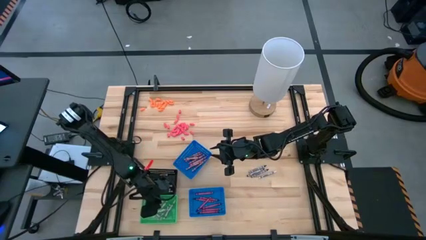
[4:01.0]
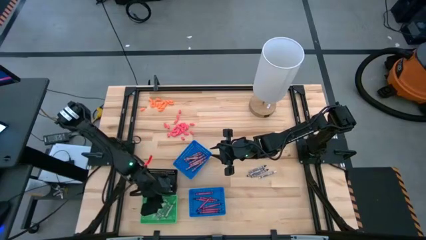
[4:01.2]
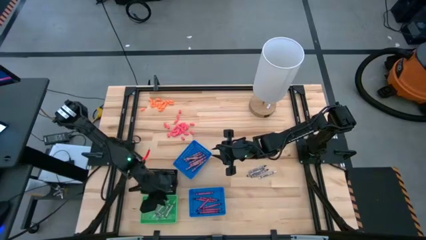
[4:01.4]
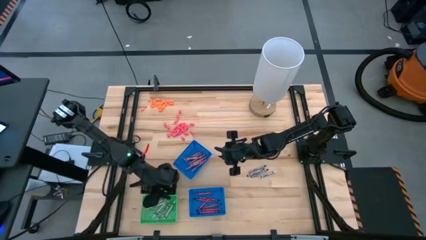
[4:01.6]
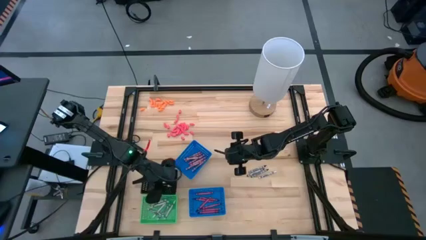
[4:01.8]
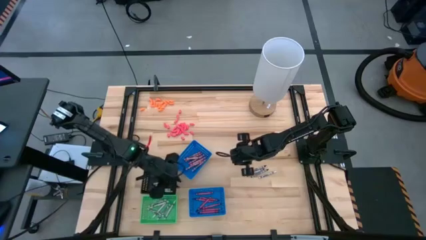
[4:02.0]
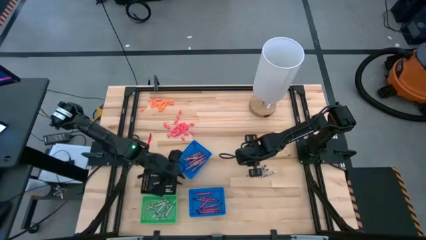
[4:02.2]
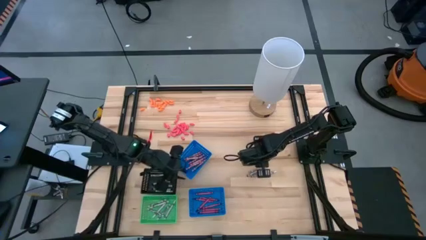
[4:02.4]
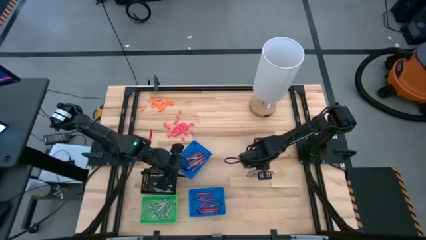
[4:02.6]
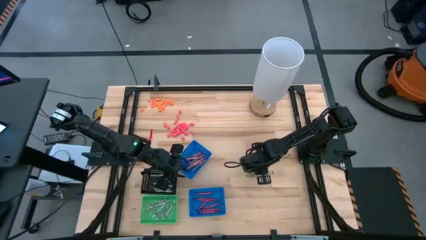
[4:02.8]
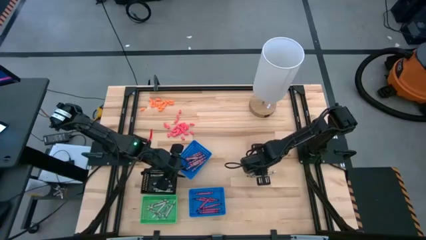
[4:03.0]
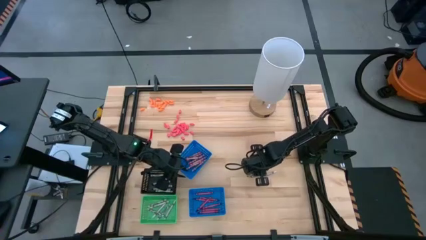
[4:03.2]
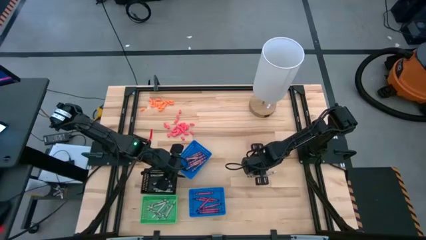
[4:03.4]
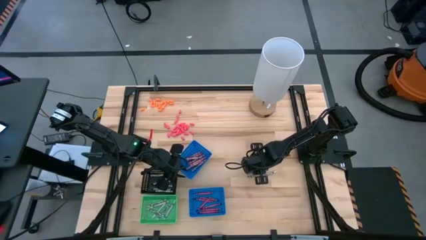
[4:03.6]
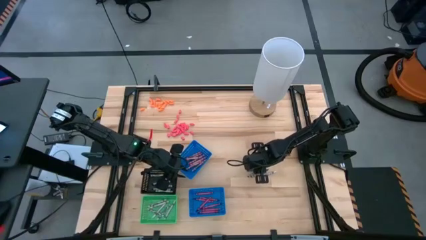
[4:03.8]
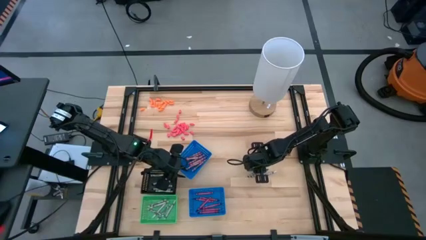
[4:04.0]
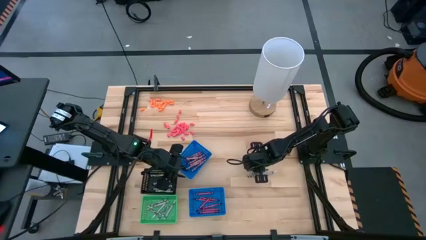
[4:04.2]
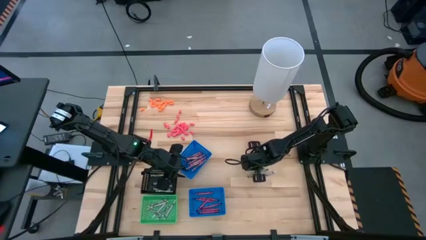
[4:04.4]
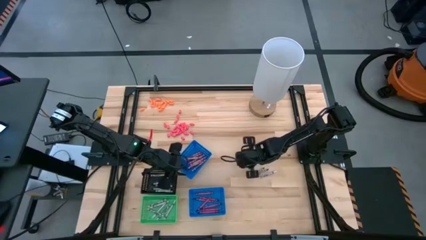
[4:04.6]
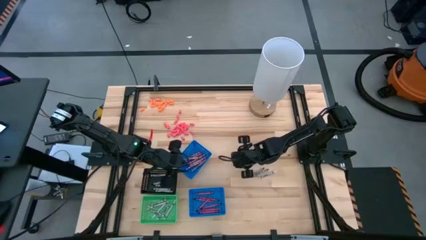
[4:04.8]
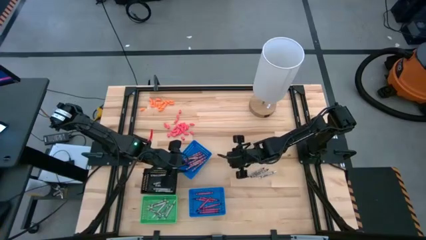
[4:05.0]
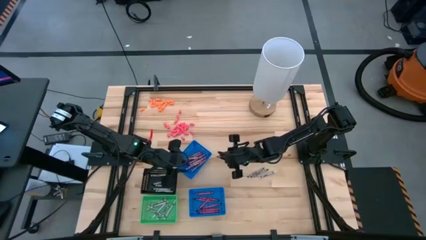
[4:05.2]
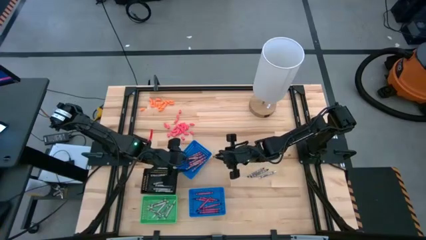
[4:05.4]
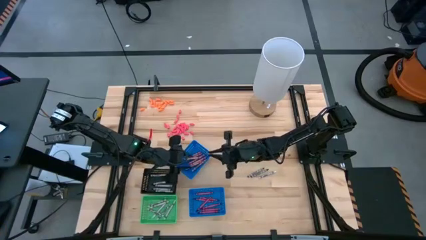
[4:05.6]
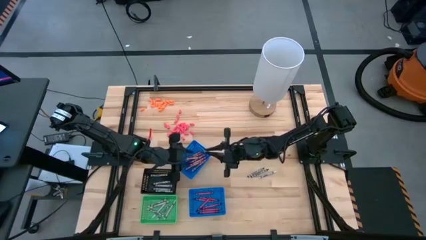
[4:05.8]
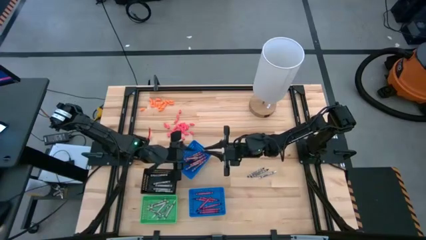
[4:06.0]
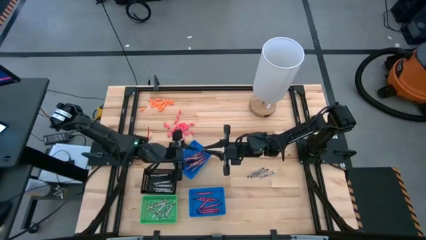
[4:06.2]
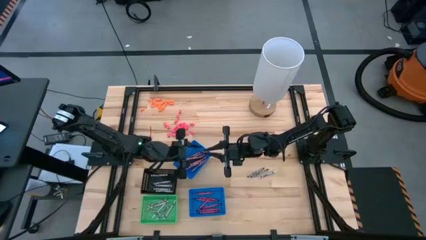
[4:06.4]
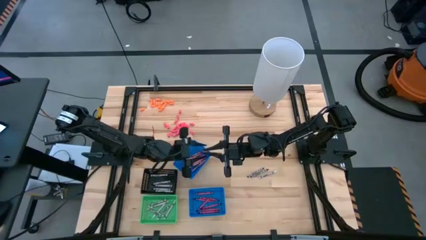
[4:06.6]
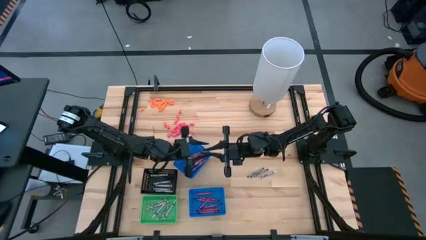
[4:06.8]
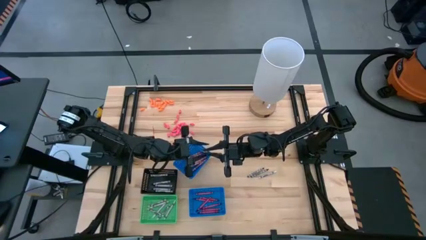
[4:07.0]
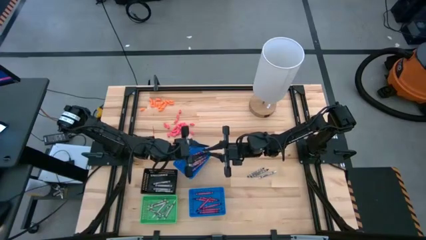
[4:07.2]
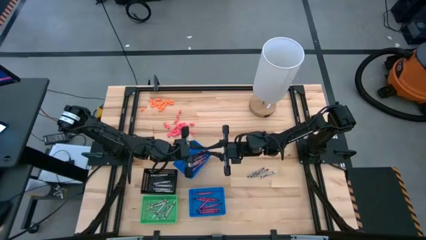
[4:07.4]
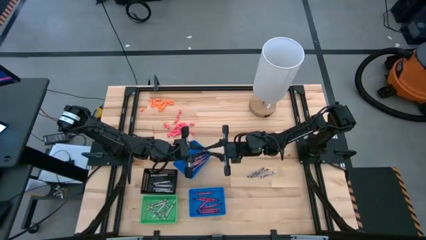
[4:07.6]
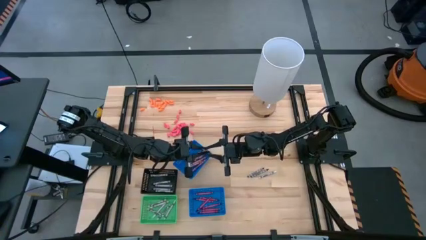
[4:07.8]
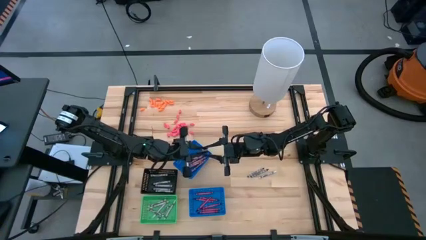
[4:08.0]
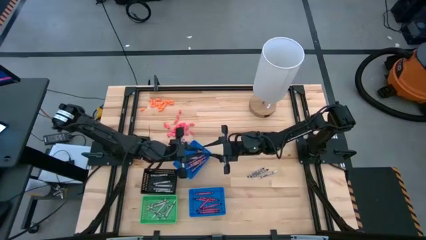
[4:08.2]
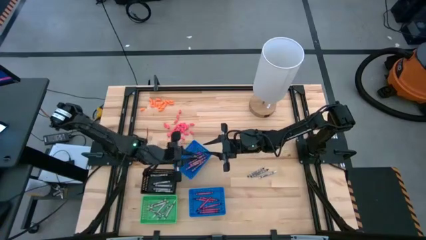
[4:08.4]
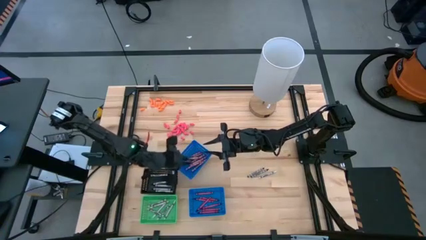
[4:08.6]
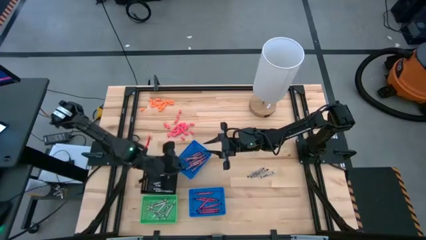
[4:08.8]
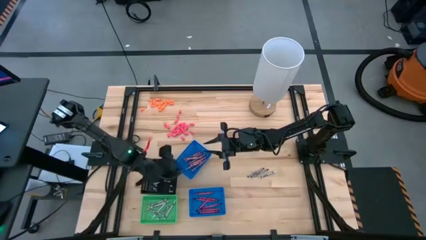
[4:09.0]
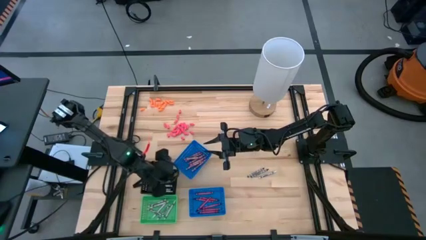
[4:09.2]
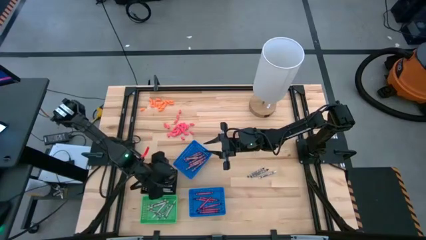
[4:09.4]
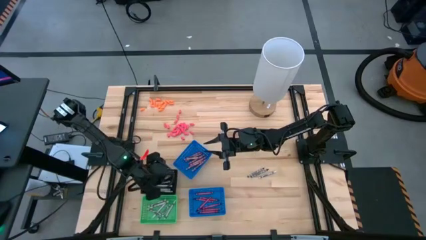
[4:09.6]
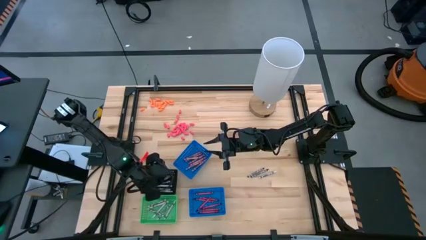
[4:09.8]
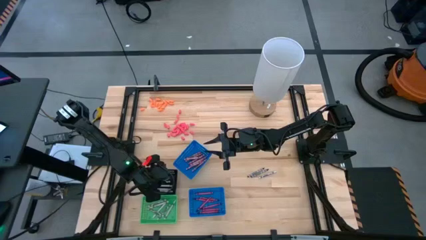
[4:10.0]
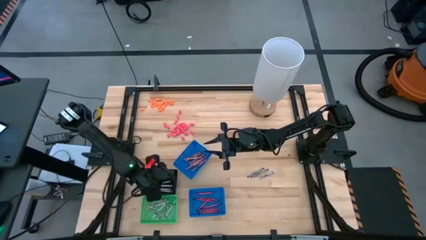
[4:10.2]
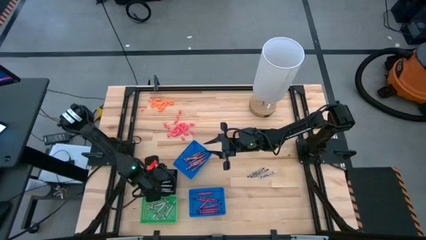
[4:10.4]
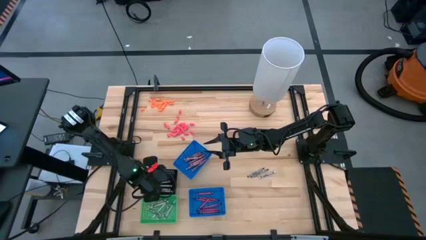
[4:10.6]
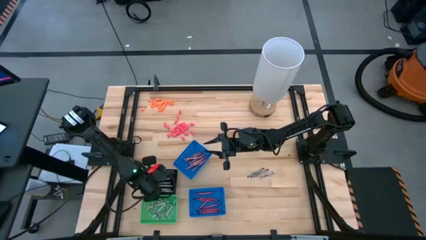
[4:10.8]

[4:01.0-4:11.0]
Task: Sort crayons
Put the black crayon into the black bin

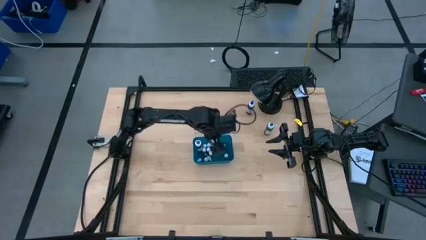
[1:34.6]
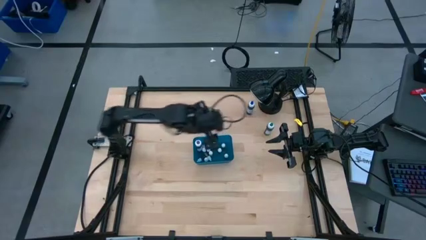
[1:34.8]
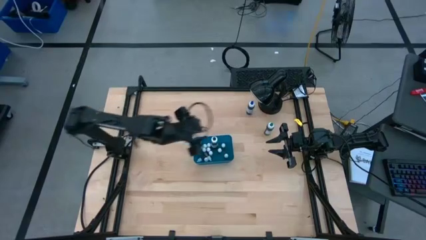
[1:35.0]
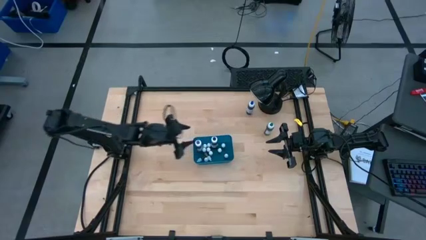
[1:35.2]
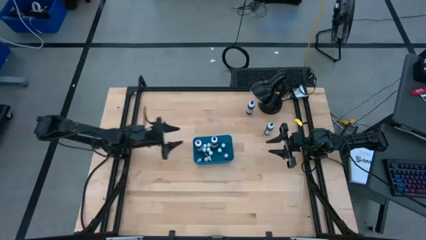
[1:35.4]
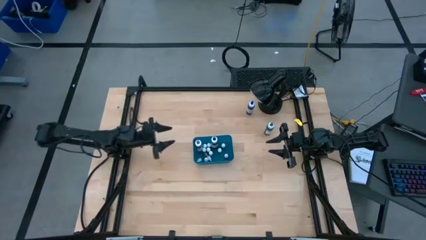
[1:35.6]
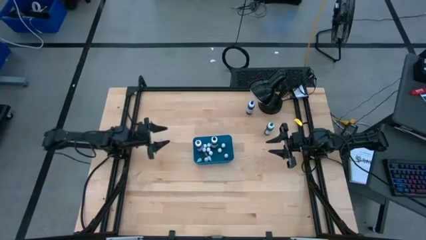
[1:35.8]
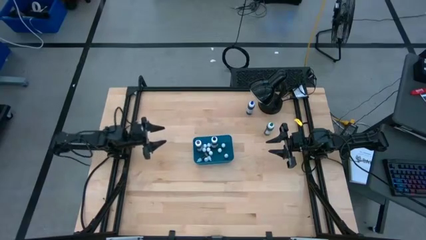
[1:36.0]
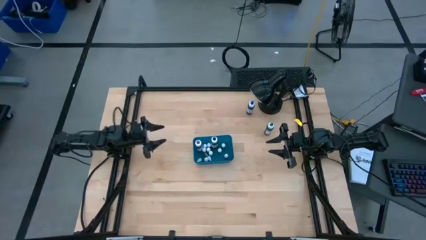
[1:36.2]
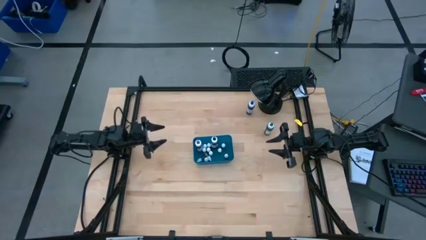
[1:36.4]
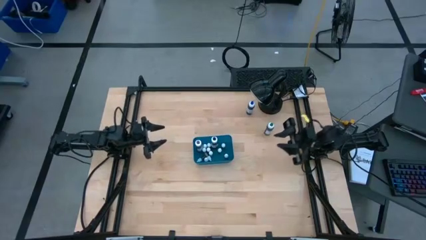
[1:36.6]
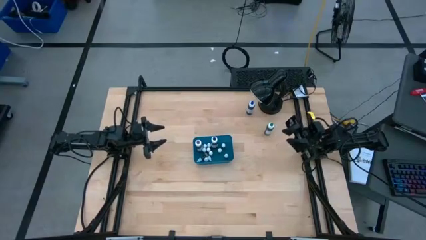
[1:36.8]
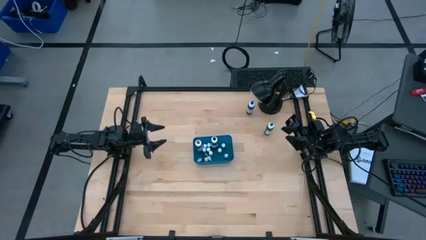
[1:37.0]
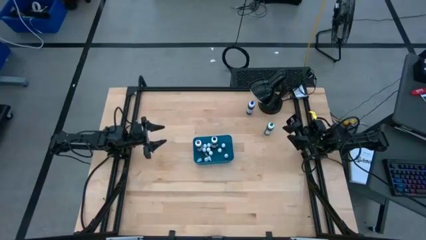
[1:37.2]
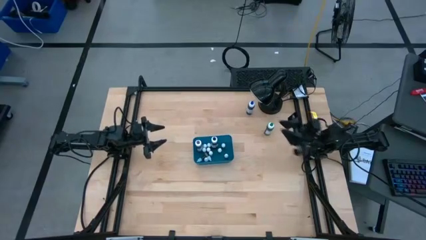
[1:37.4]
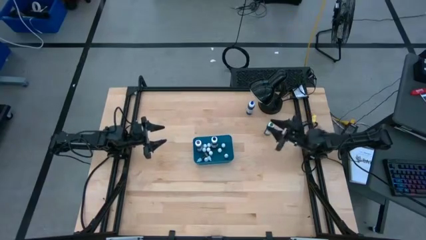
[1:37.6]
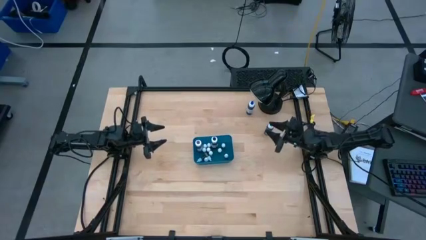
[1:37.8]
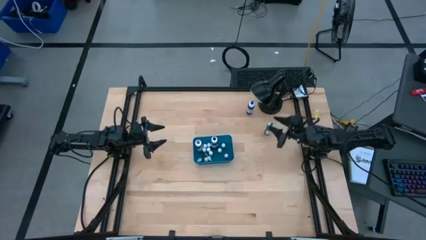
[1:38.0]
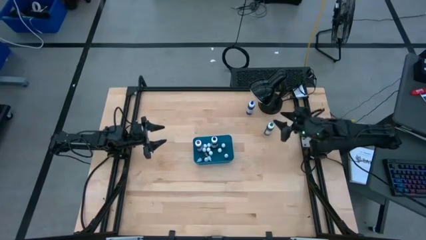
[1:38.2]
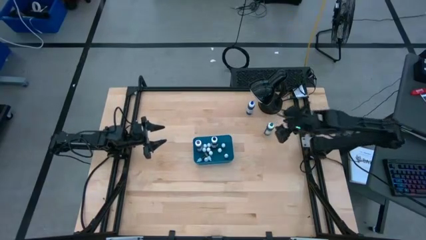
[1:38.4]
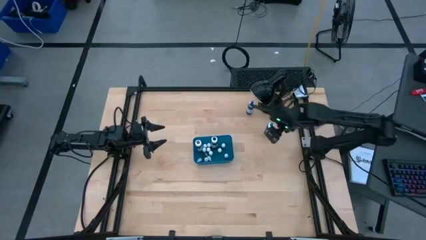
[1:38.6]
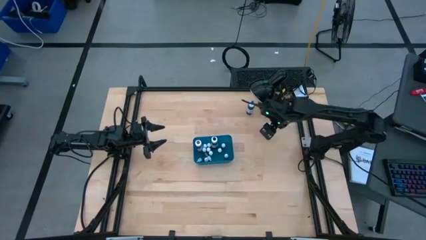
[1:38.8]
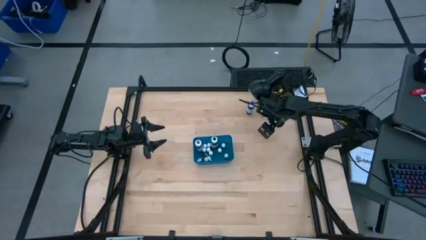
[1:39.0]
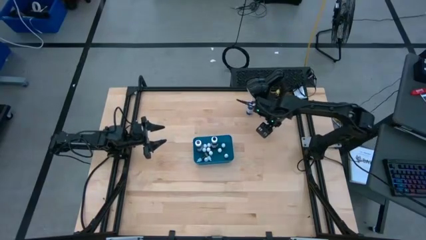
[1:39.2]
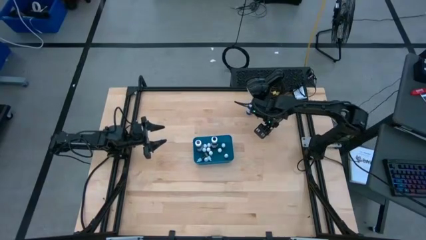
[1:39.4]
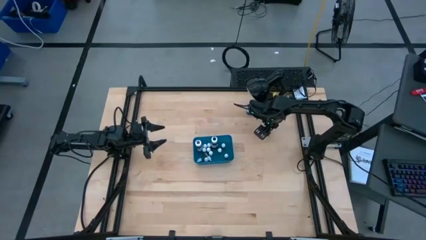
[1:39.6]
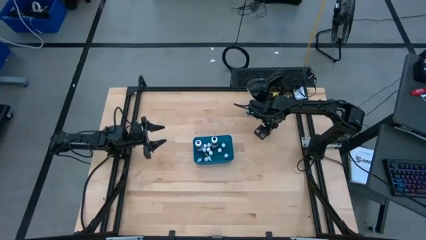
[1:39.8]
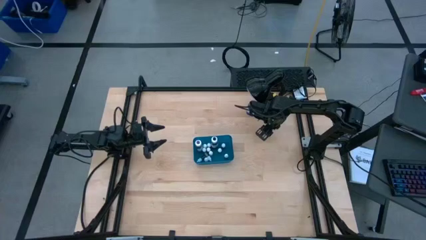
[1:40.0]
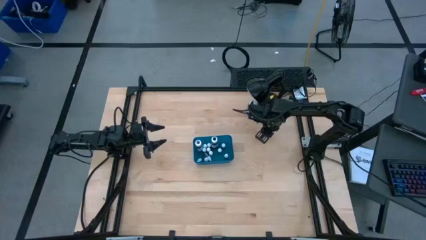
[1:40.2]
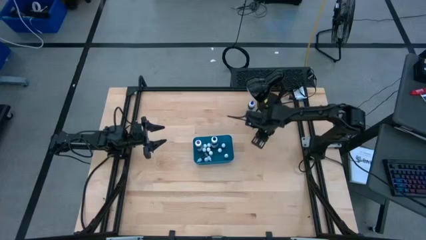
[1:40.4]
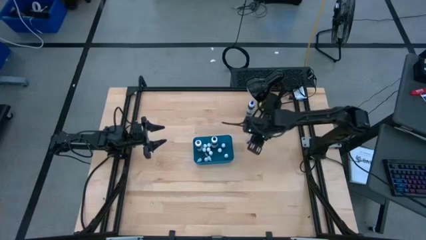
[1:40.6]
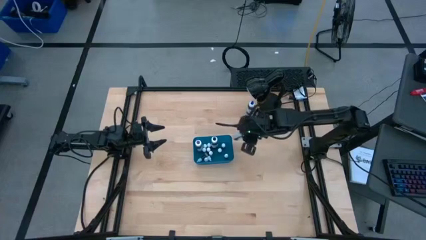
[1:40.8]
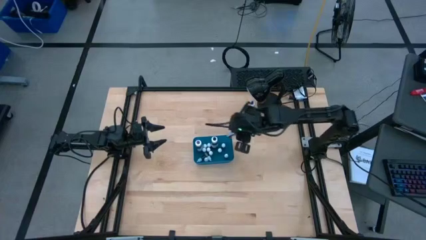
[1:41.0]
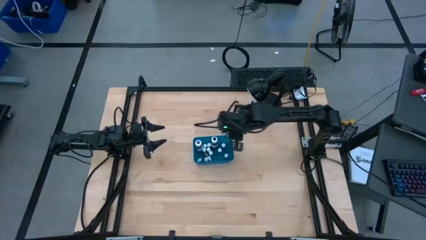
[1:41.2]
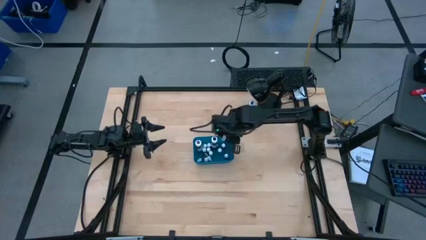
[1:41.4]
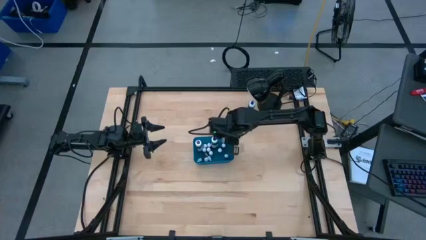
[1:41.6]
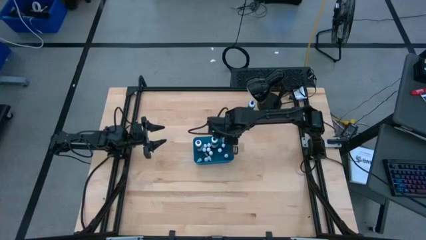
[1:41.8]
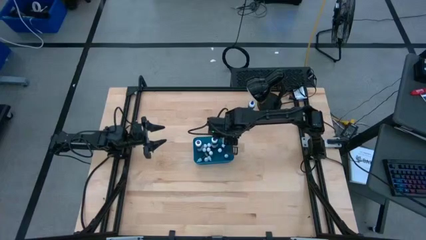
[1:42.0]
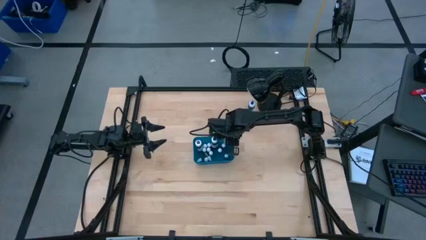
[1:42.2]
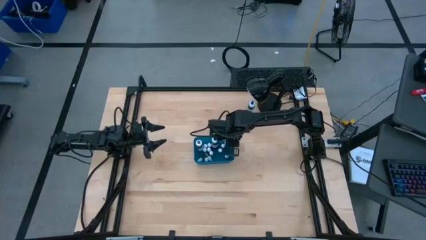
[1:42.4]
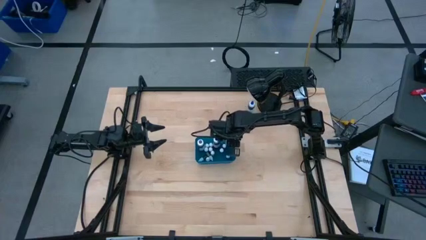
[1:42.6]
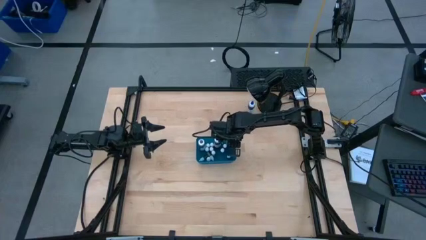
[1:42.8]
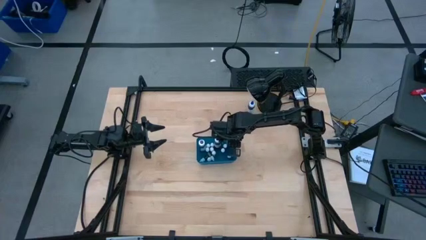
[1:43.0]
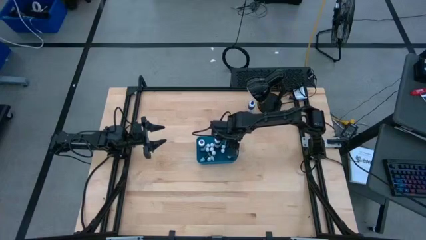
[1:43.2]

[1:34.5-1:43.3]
Task: Pick & Place food coloring
Put the large green food coloring bottle into the blue bin
